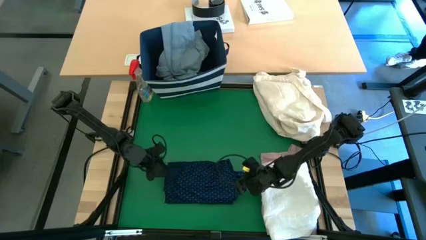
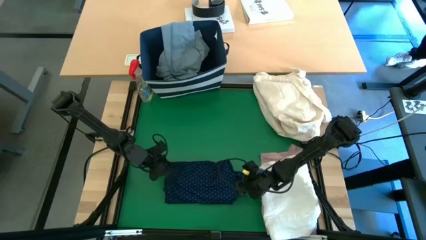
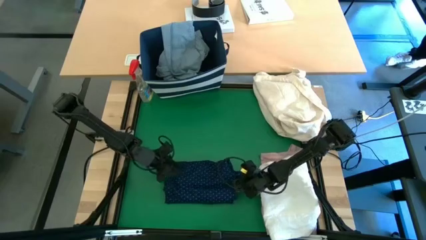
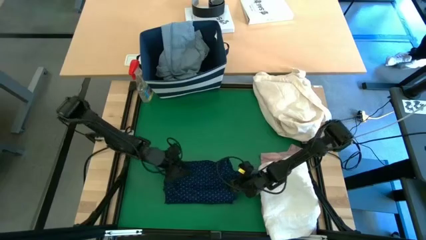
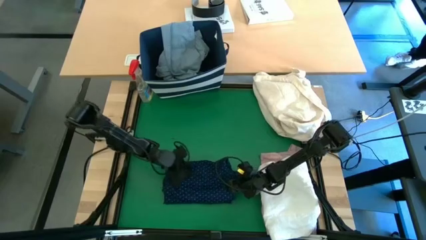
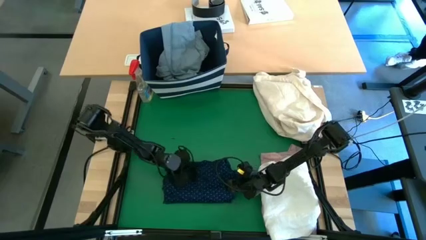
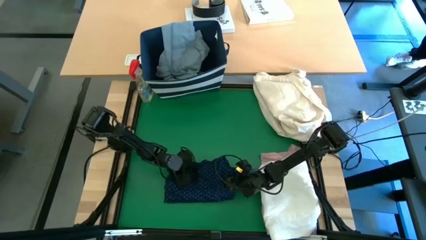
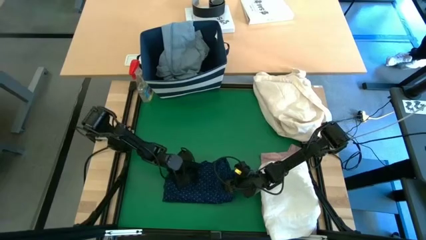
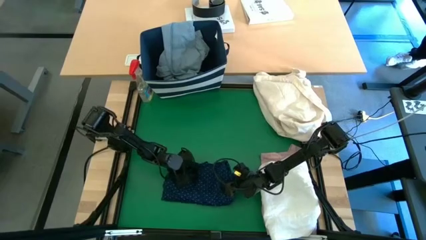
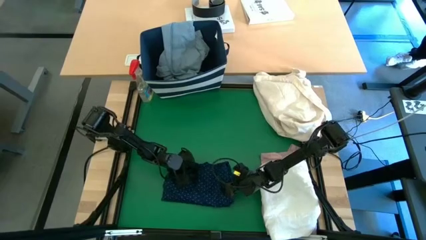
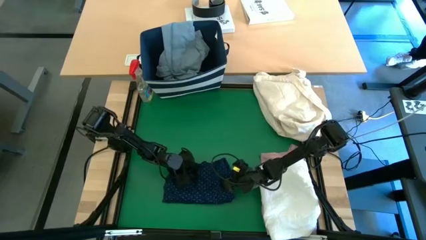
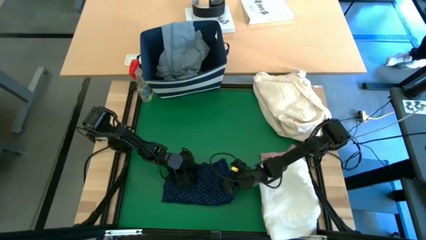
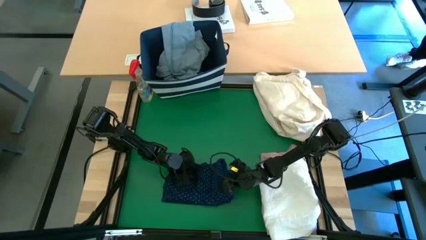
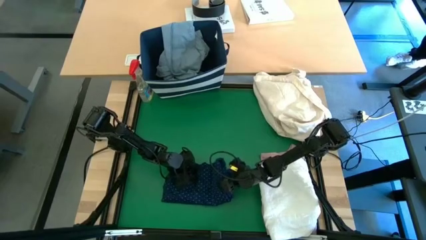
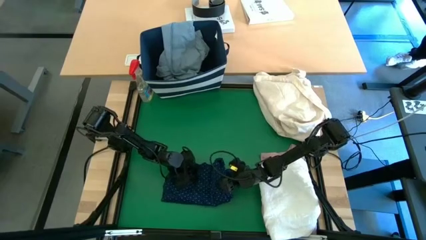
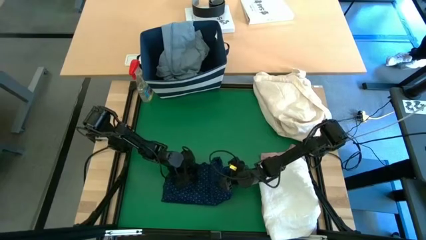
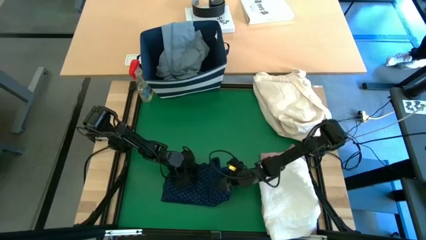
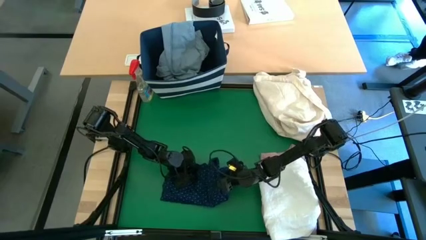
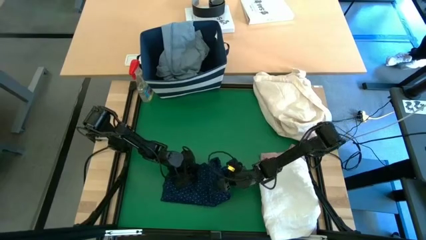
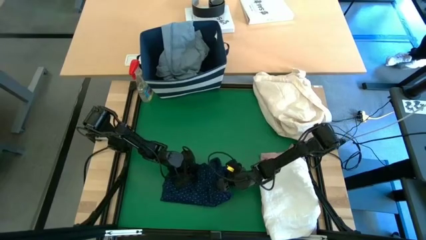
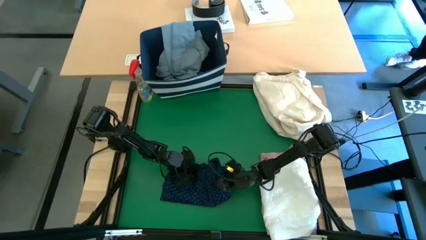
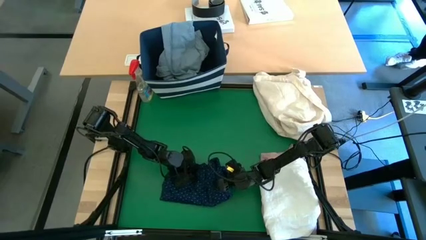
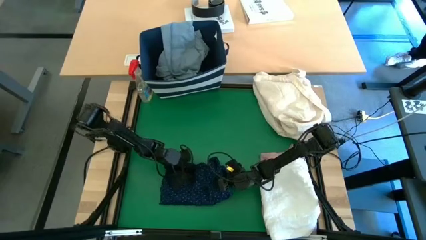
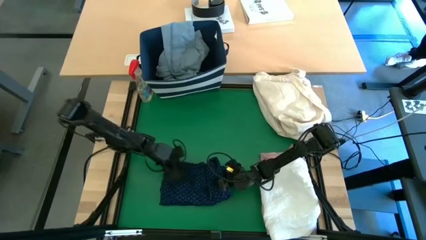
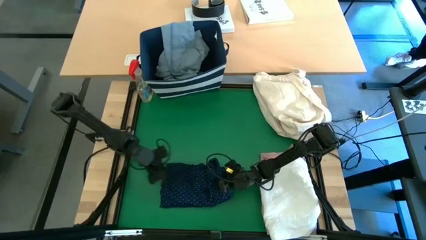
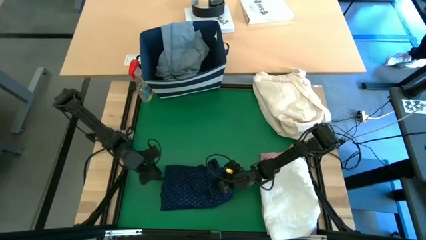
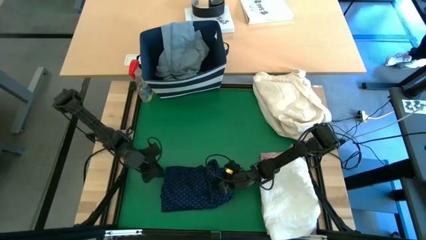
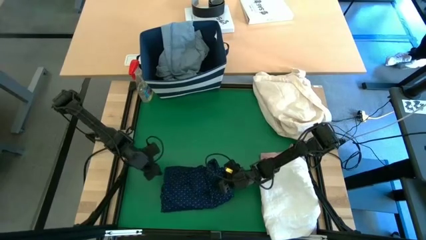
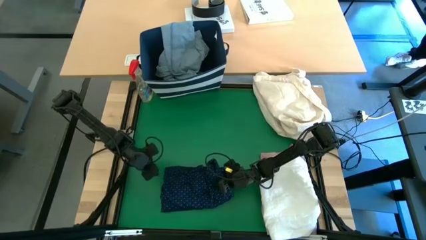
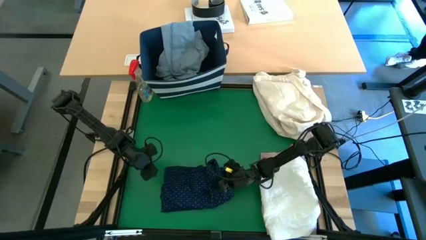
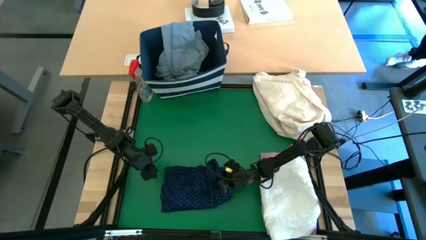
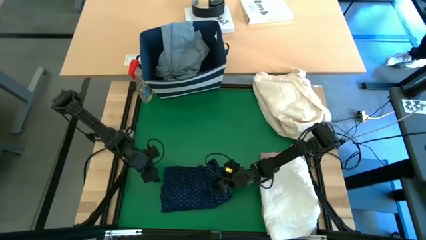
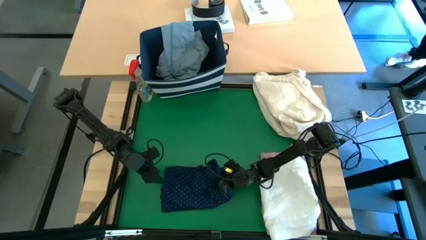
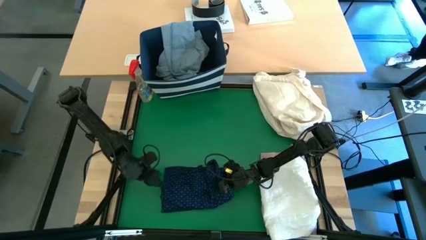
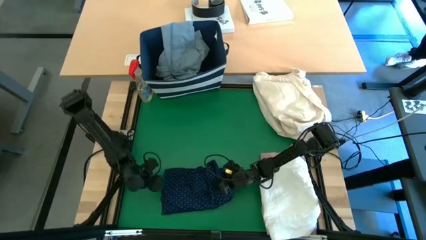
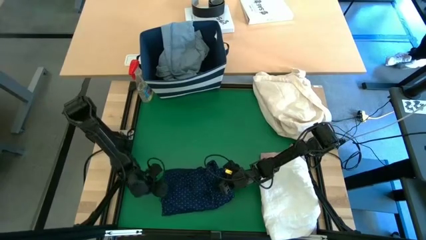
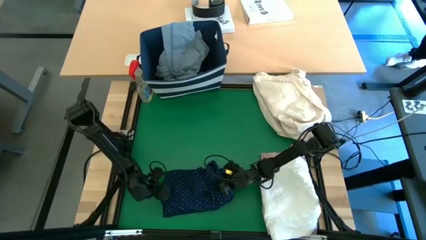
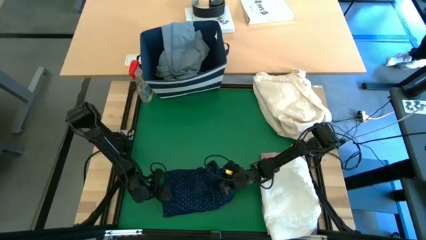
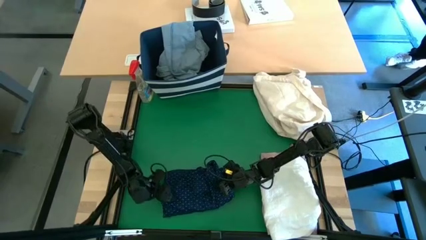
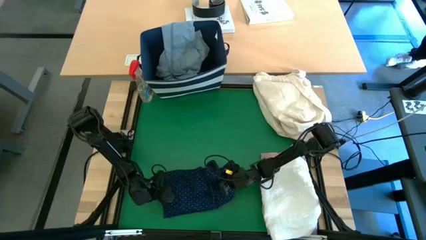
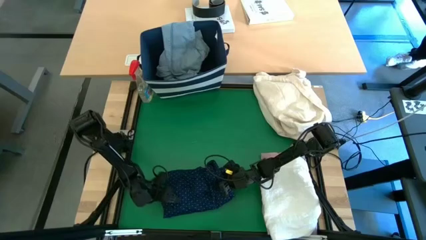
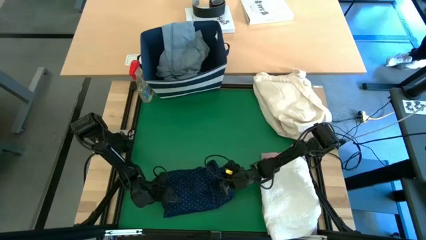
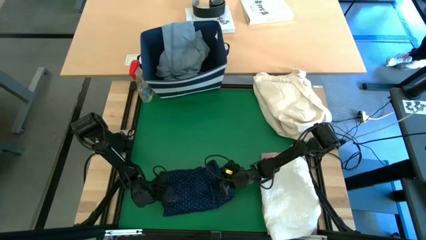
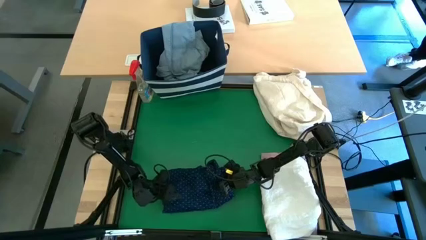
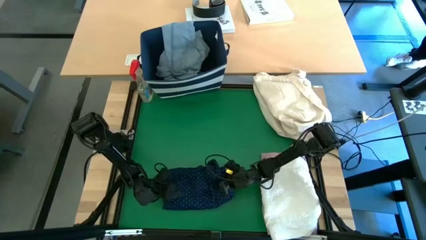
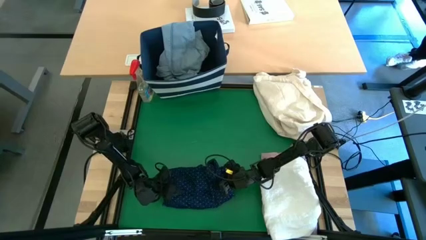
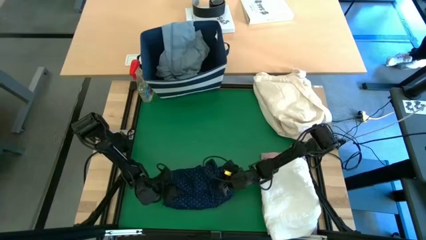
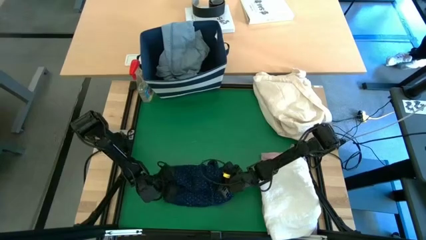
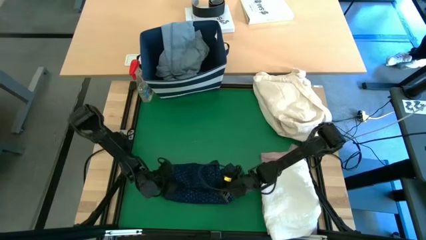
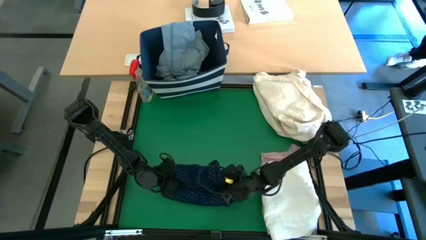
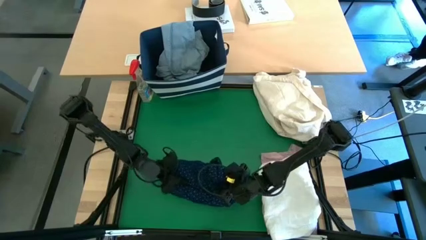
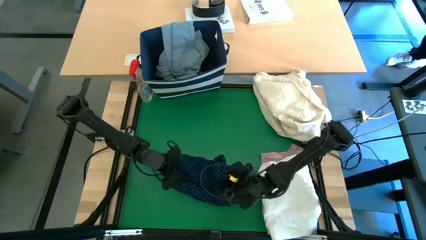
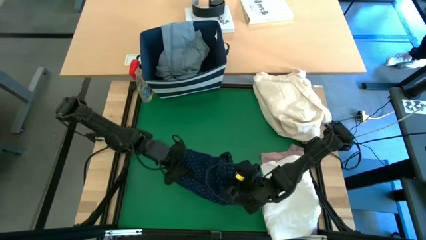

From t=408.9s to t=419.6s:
Task: Fold laundry
Stack the blue polo on top of the white polo

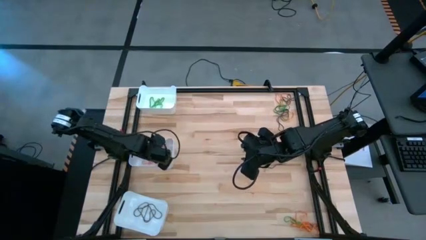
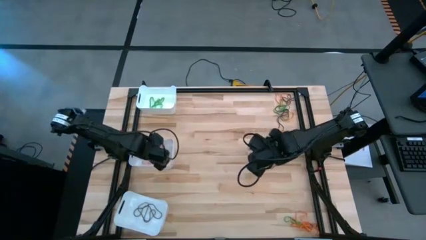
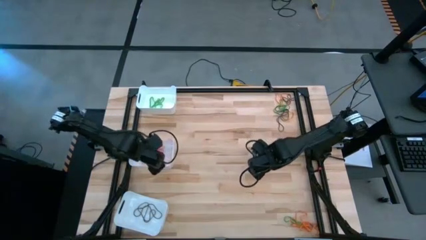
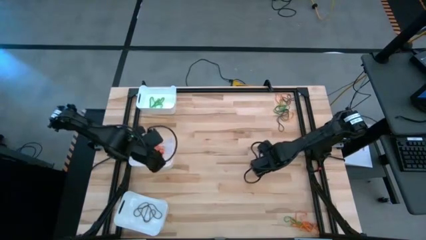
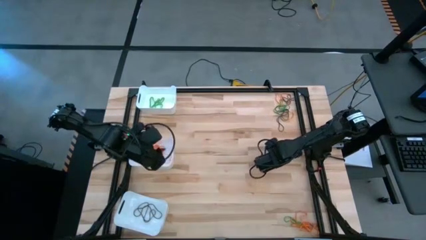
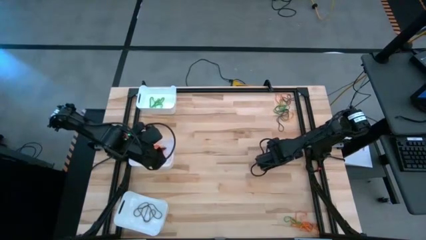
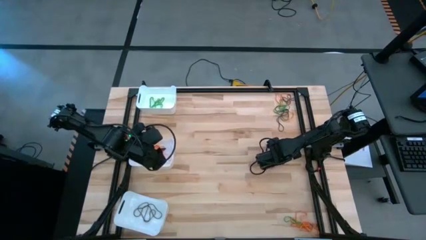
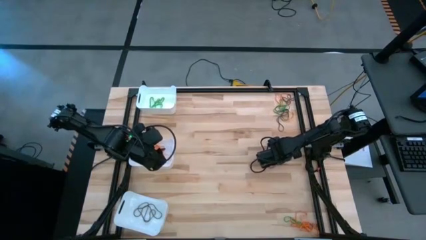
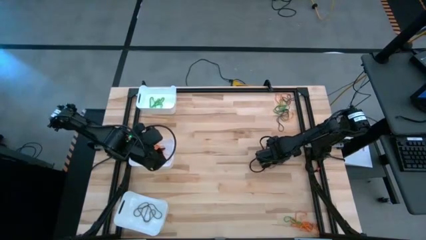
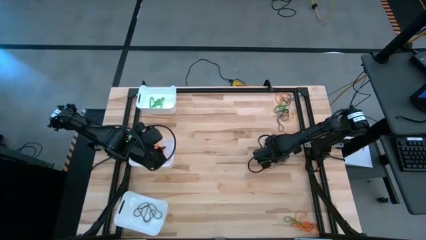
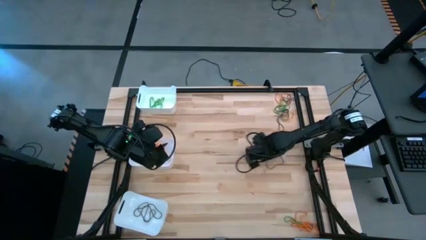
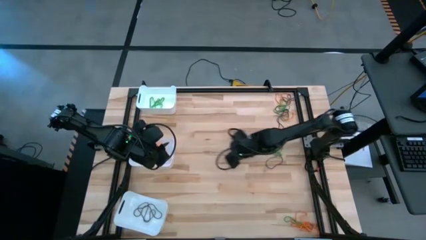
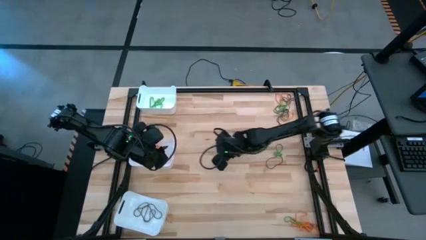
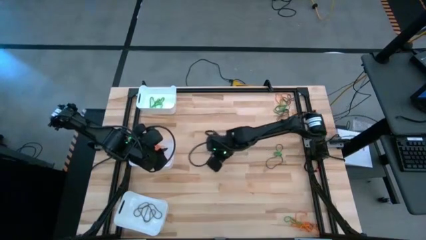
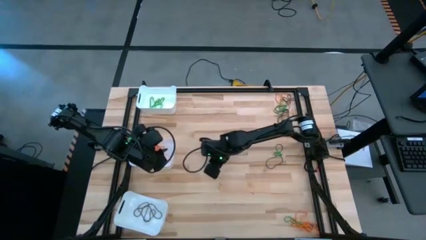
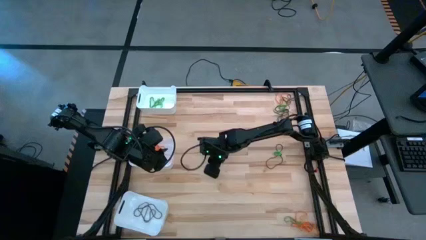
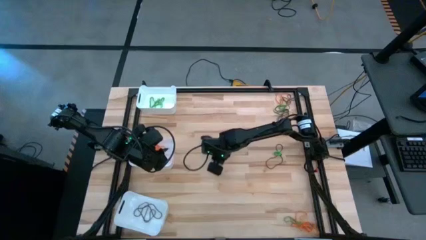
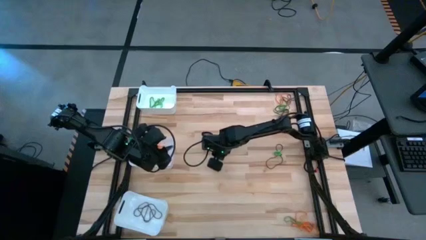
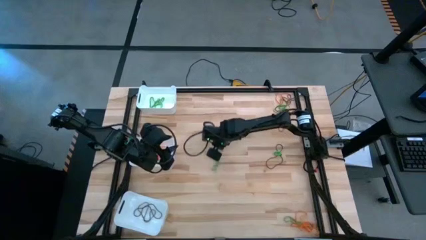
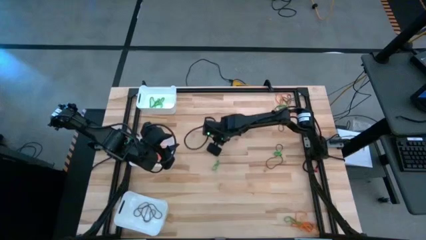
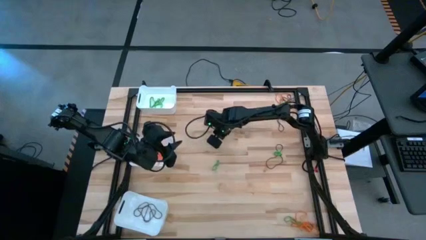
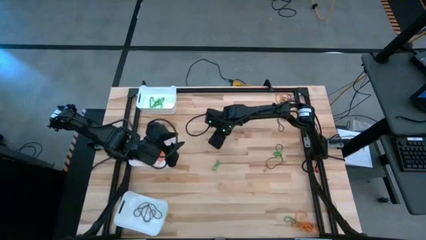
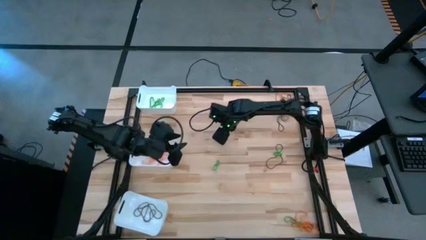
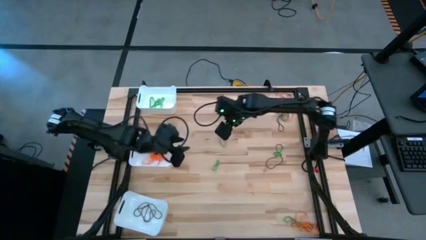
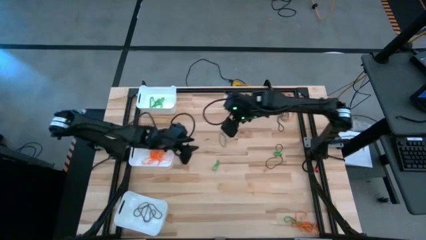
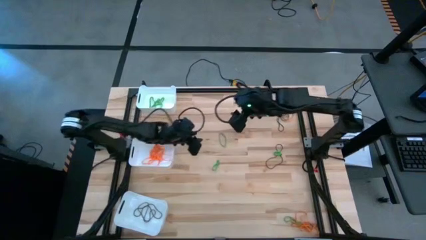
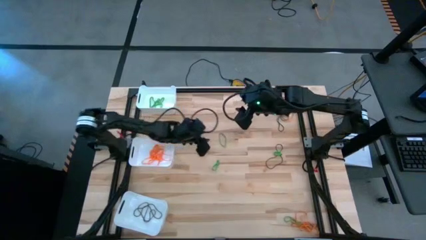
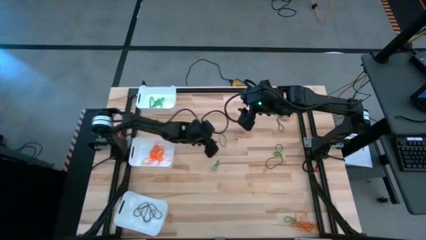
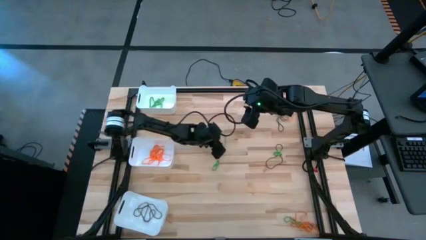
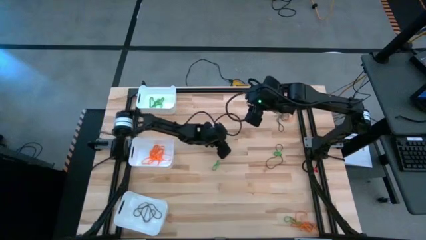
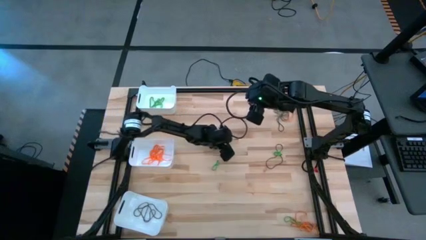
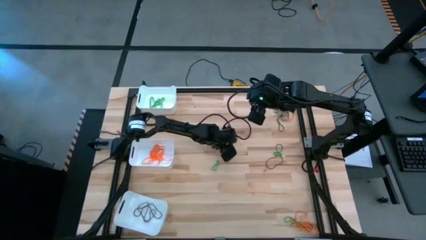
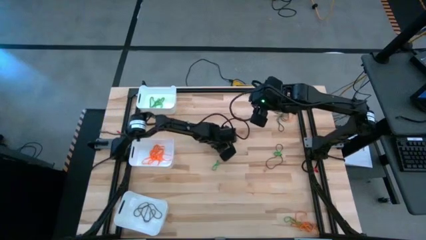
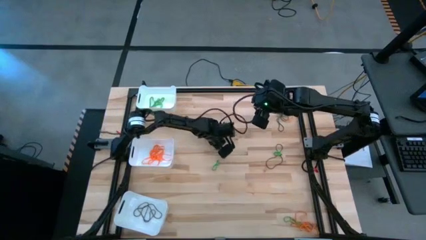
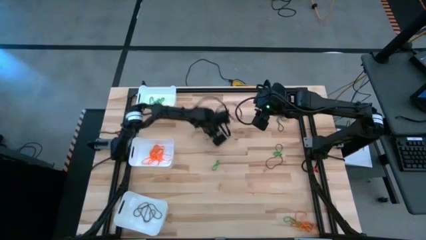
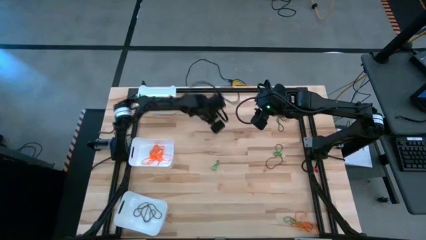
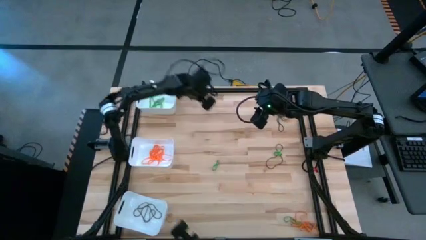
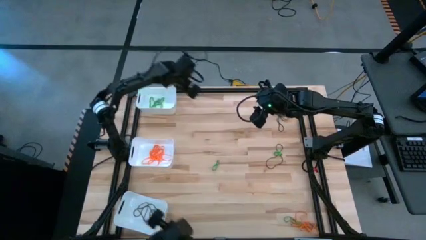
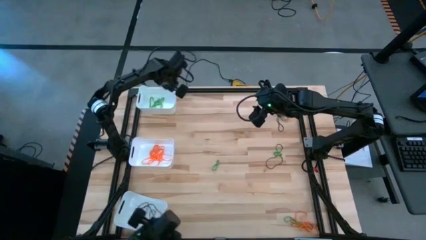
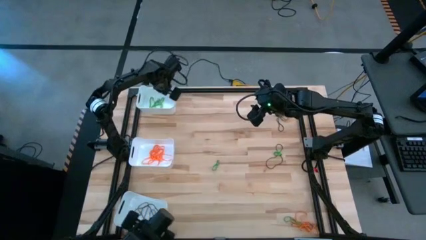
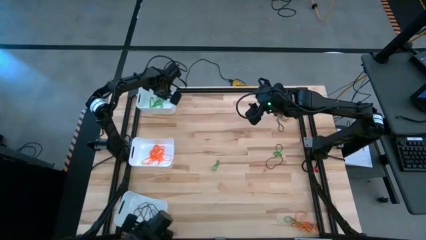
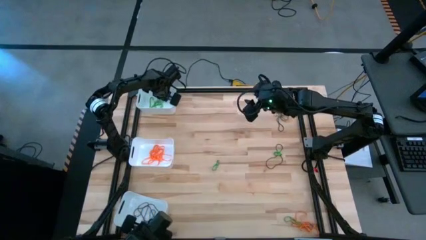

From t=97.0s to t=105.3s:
Task: Sort rubber bands into baskets
Put the green rubber band into the top white bin
